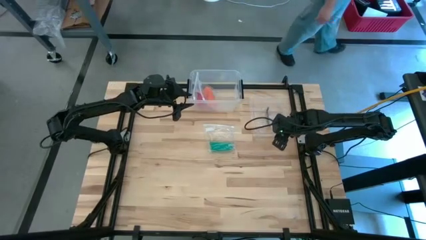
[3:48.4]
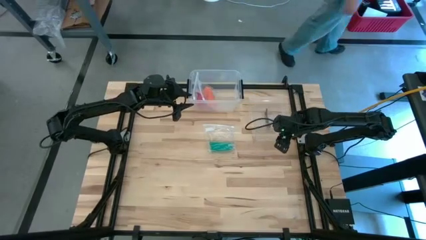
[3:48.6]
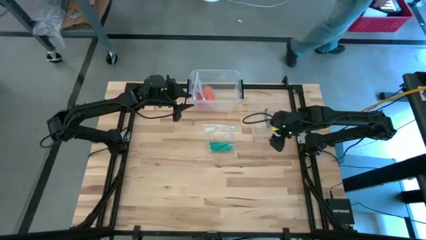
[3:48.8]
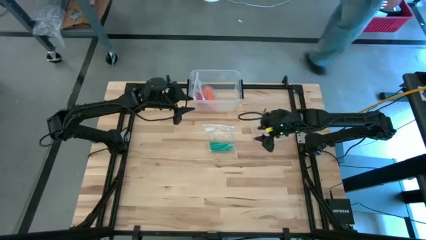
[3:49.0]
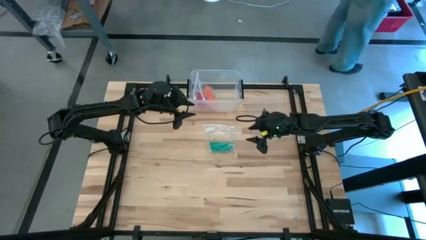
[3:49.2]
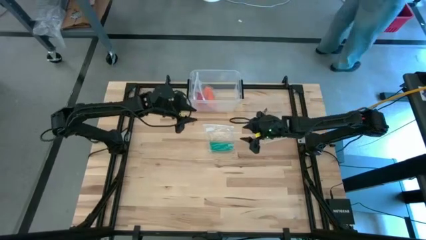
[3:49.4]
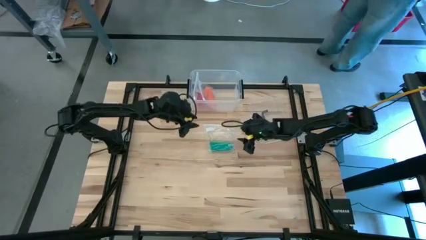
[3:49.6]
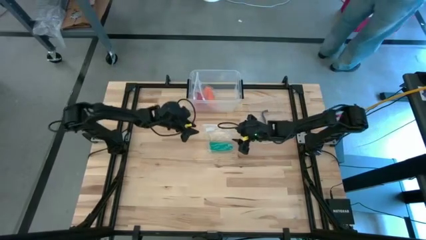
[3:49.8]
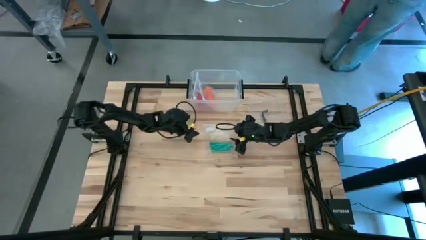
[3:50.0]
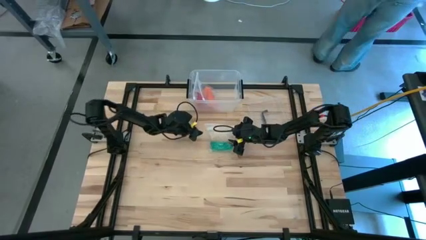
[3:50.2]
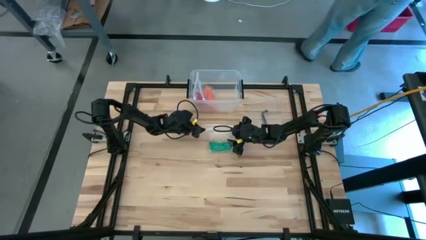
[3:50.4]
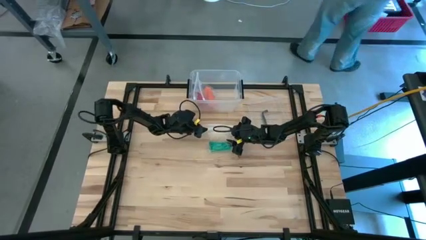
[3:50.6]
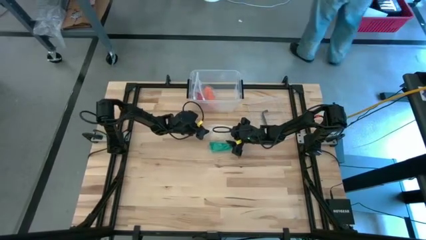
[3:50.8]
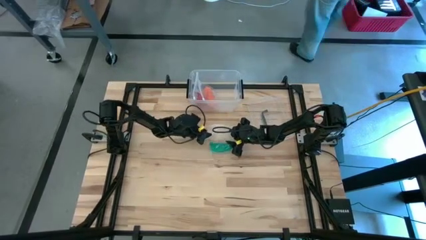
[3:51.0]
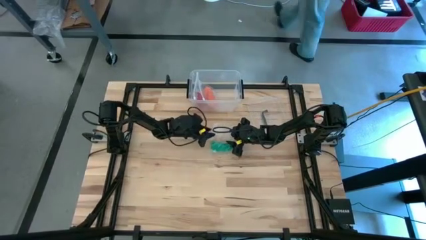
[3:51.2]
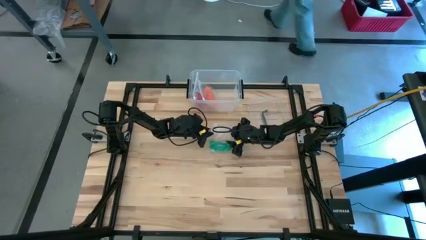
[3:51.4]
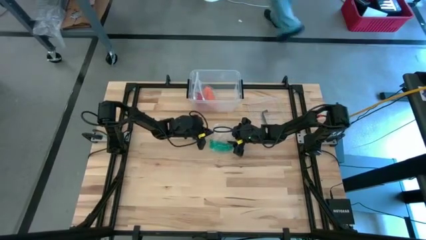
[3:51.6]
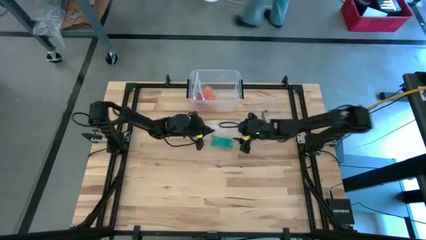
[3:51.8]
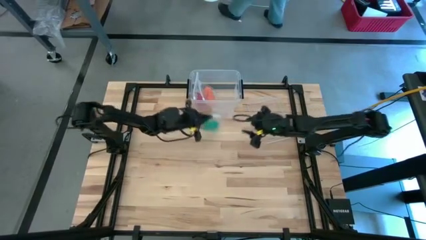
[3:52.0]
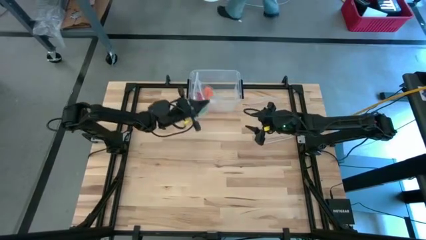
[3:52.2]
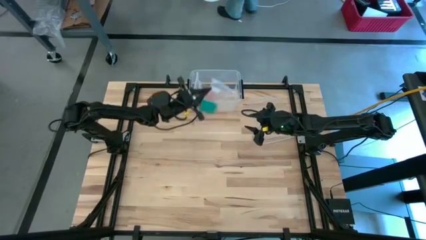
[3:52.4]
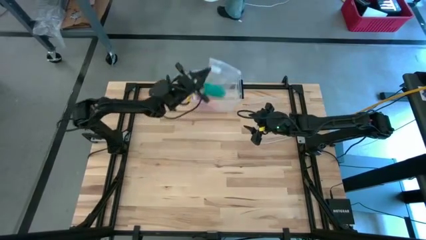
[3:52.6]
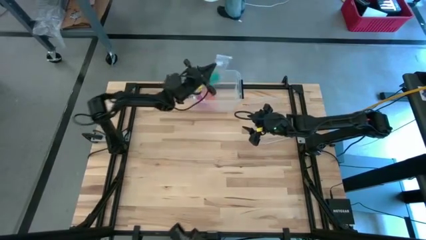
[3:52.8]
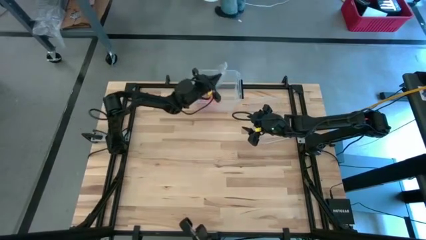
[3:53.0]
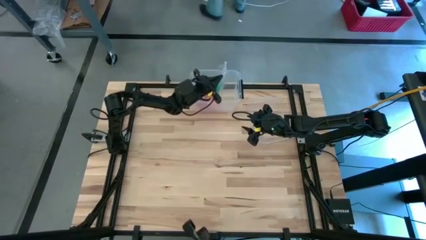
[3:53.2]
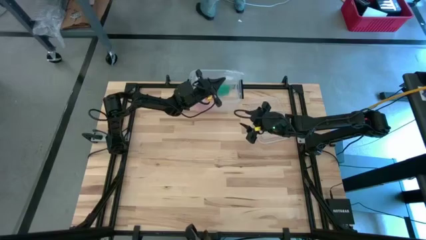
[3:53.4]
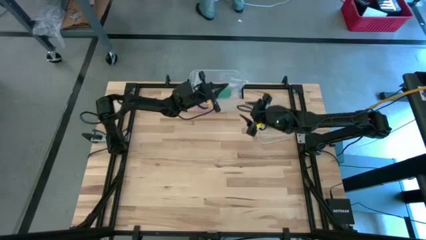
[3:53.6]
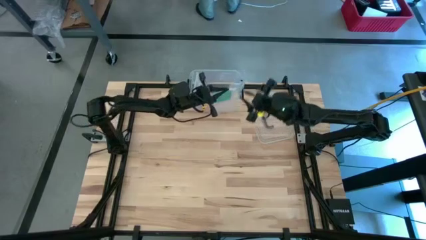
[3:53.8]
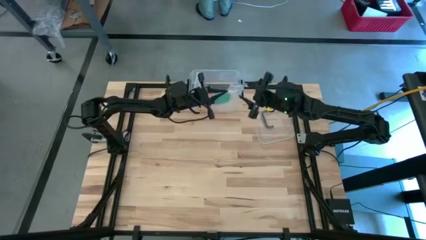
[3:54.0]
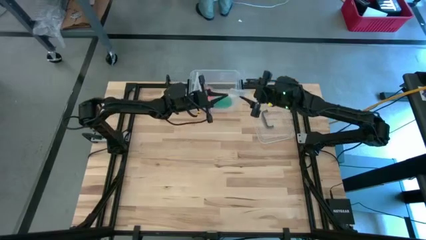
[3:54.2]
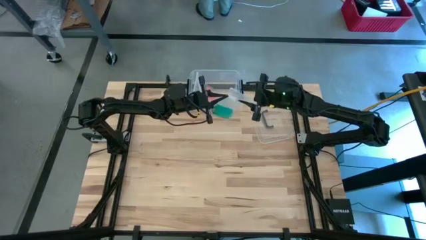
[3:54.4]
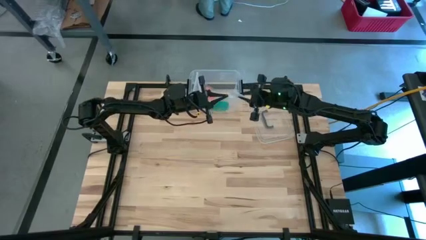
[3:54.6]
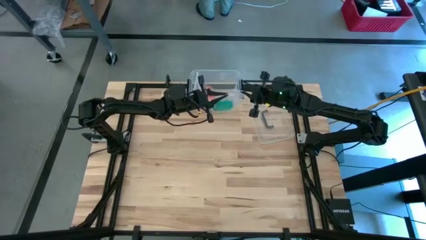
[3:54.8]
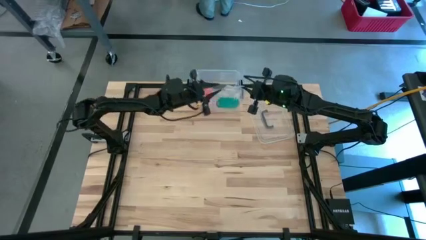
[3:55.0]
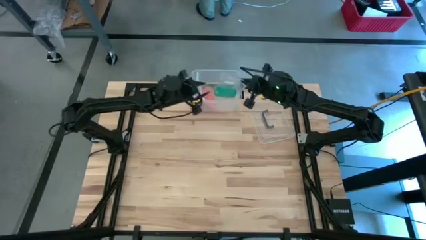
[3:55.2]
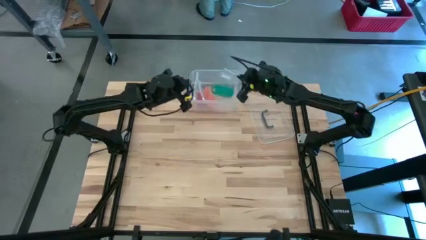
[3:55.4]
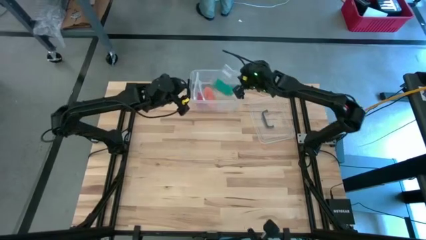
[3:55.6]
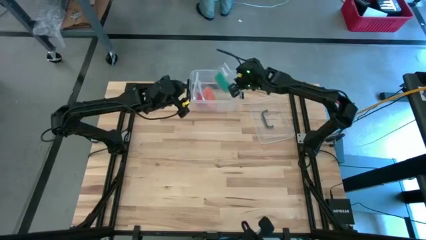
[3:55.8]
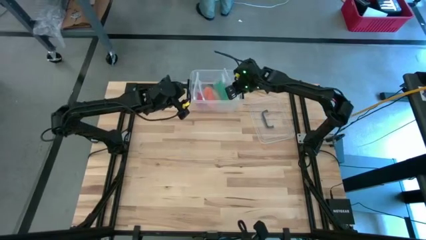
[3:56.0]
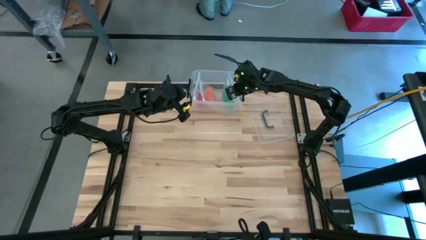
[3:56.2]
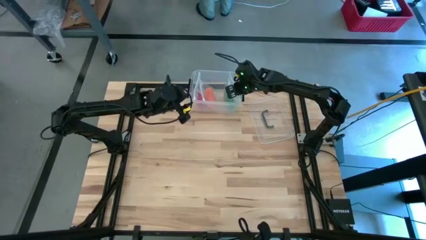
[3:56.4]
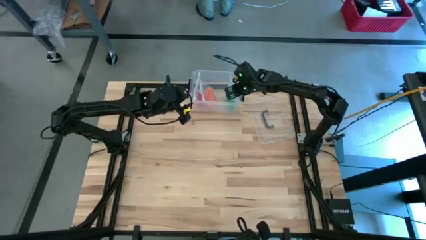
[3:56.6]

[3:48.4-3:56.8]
Task: Roll bandage
Put the bagged bandage into the transparent bin

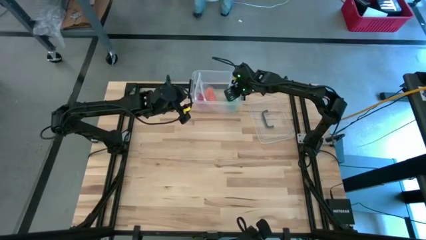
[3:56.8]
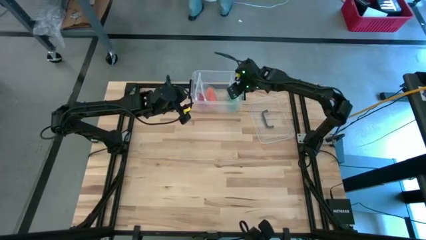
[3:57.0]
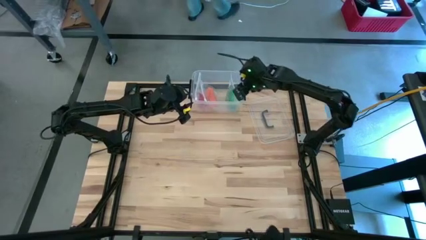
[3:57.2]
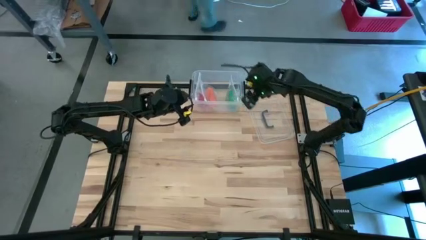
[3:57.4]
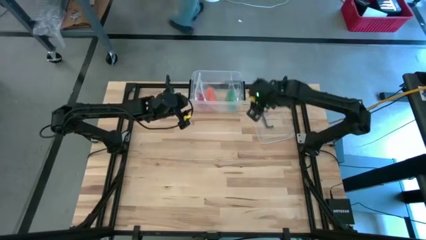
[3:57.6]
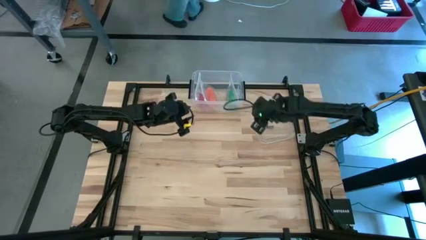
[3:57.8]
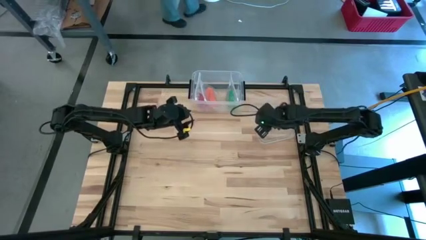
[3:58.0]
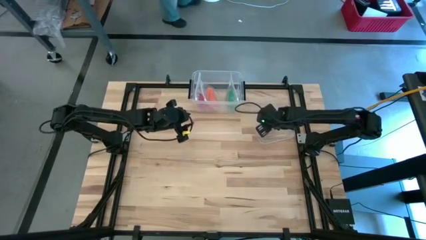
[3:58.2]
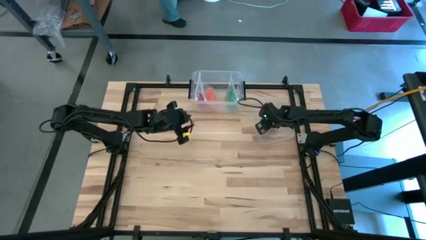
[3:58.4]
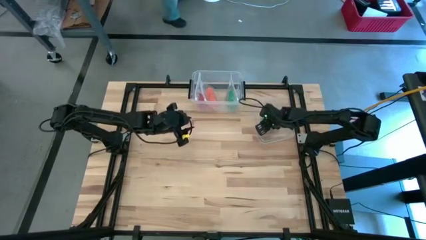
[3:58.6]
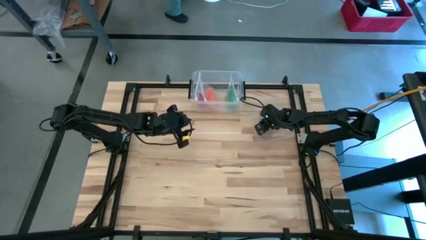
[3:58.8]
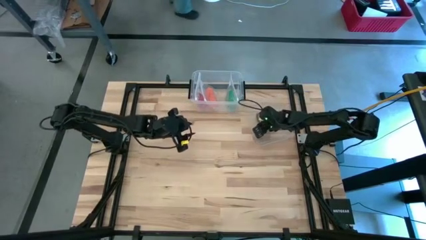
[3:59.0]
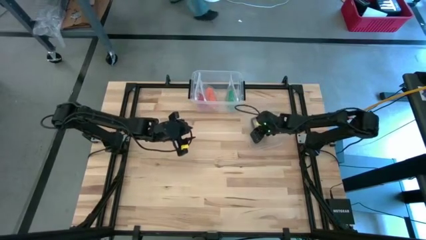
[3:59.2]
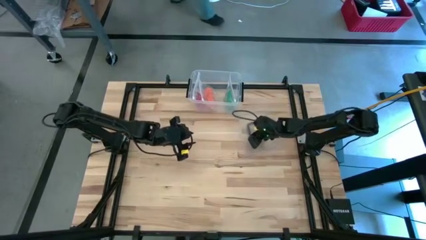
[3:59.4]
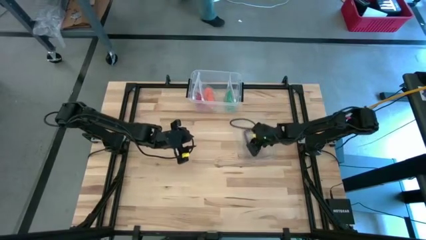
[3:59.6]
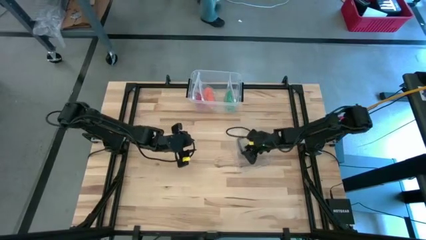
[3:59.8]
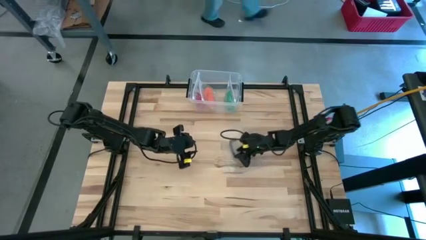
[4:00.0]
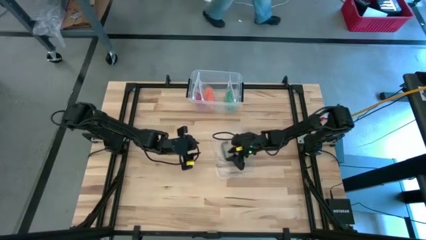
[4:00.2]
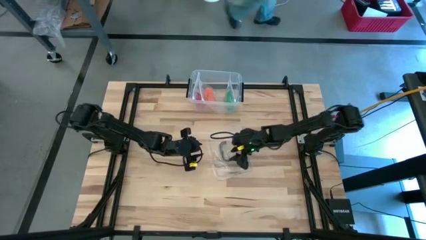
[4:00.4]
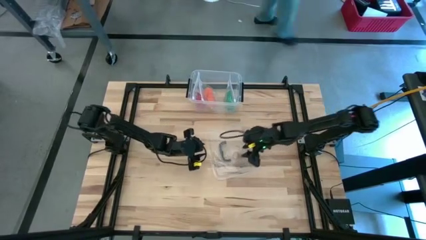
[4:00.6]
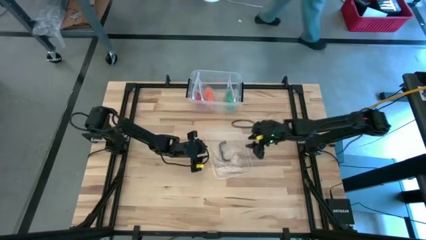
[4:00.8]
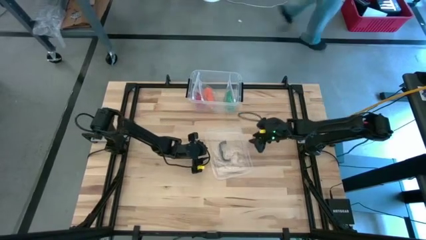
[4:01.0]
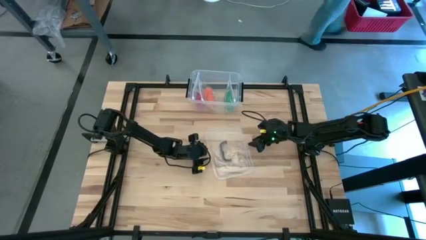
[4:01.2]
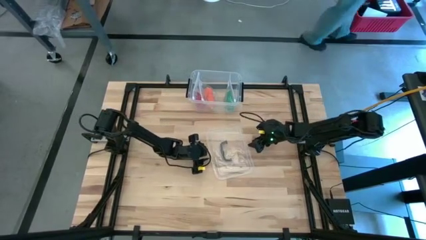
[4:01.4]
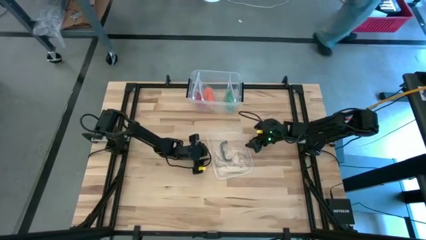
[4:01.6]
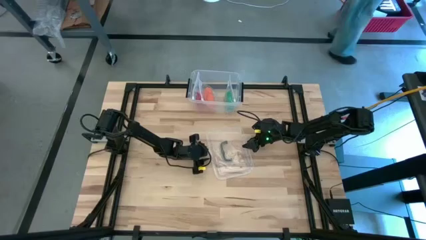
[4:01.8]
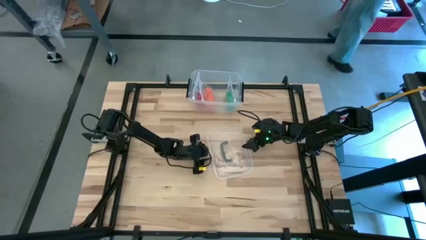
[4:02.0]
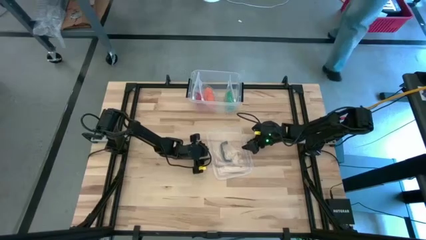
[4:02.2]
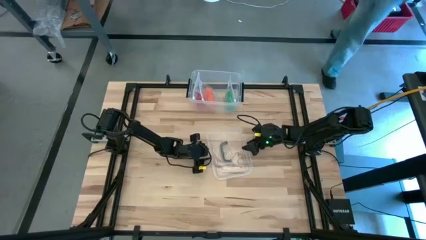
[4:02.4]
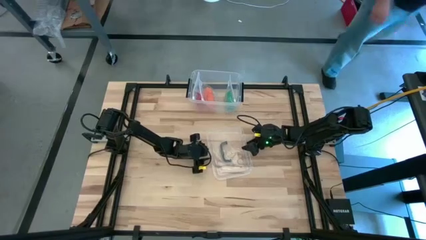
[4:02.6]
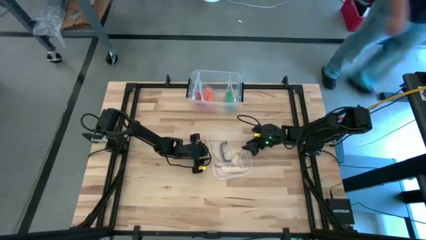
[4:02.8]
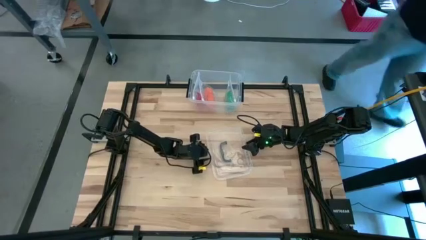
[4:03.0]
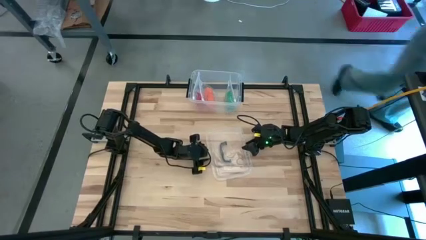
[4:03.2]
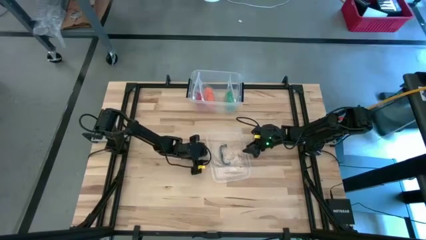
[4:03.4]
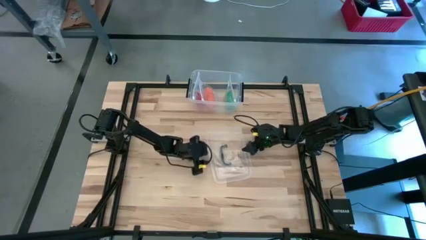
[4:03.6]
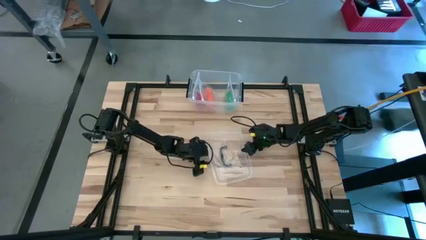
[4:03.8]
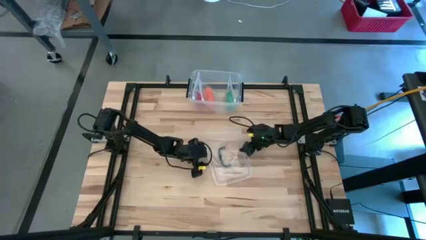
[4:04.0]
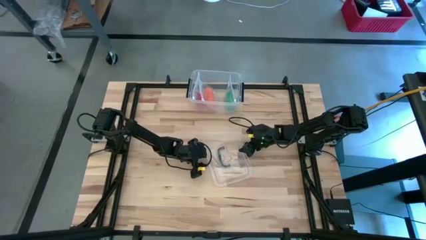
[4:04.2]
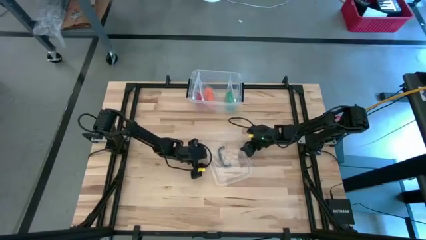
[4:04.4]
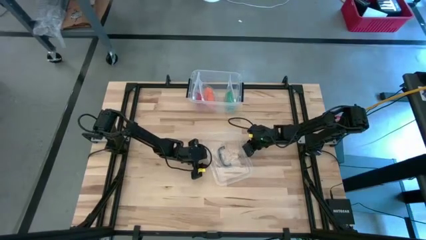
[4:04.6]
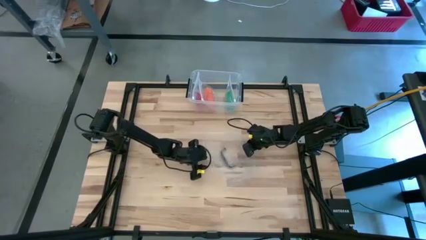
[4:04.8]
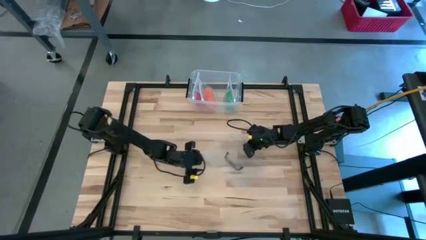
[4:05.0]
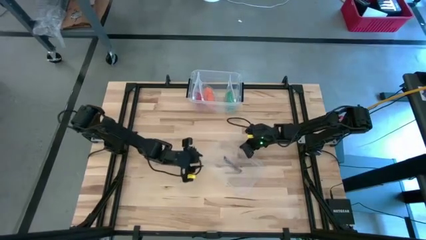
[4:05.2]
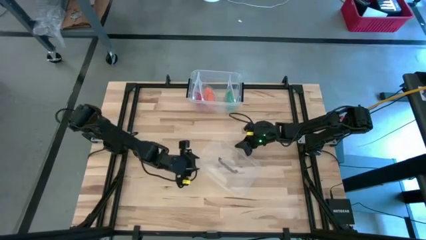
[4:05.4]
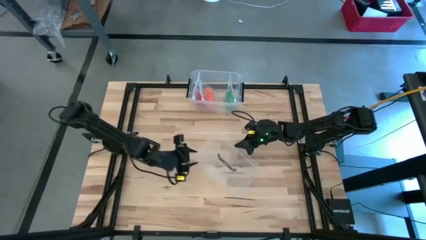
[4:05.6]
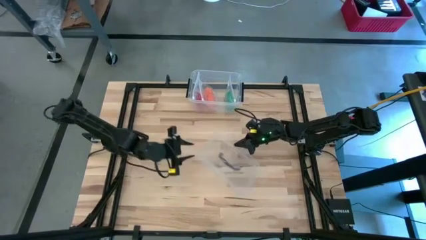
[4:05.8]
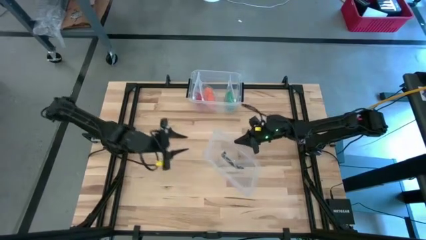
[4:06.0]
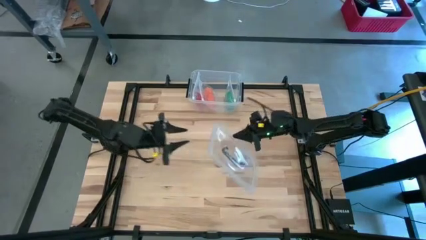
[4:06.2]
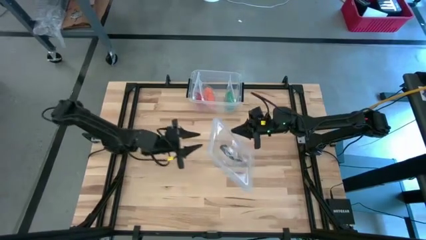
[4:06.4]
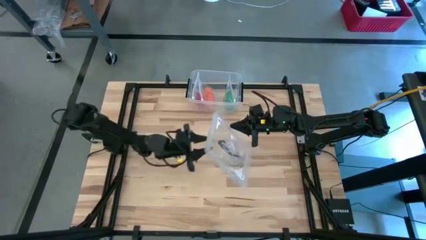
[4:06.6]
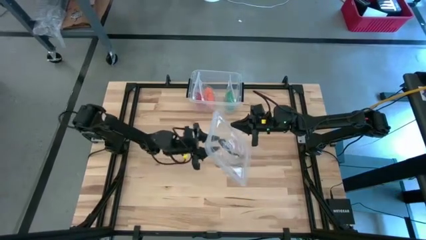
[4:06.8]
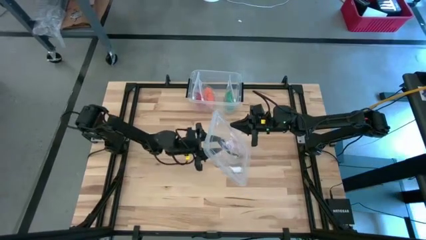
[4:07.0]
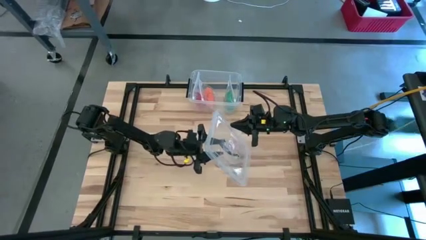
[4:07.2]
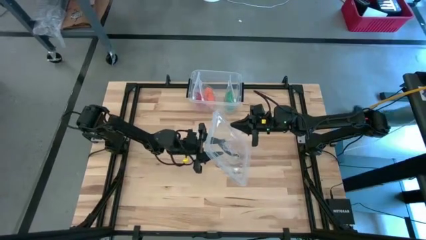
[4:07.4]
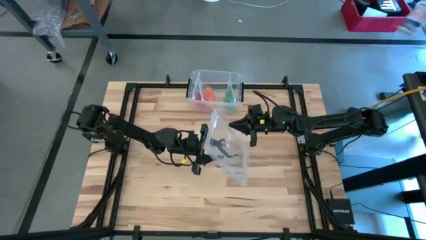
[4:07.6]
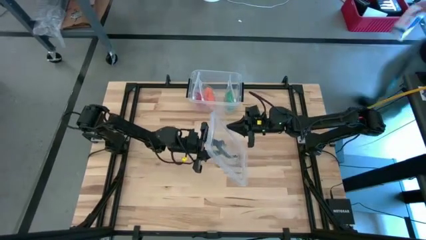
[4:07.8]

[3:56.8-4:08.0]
Close the transparent bin
